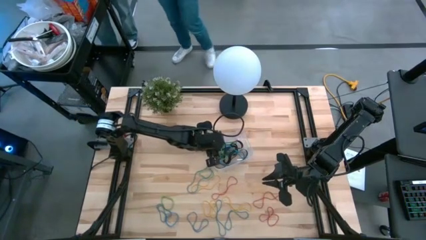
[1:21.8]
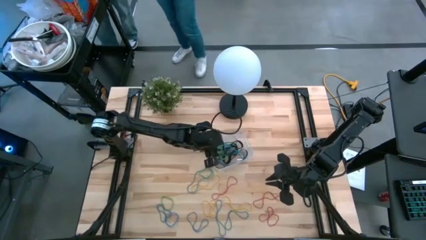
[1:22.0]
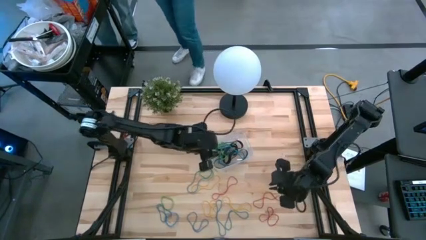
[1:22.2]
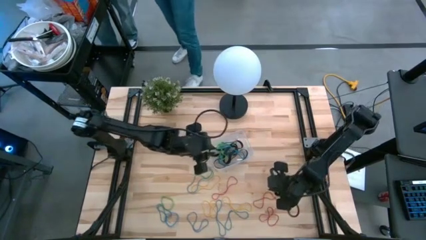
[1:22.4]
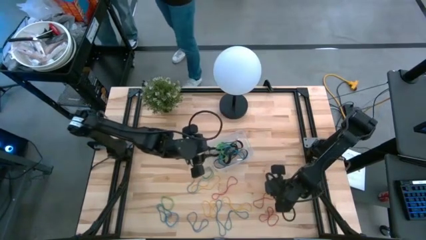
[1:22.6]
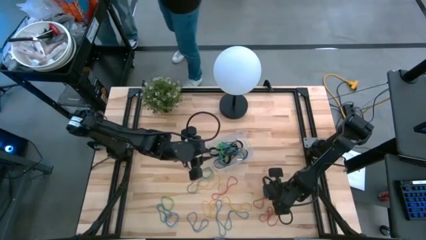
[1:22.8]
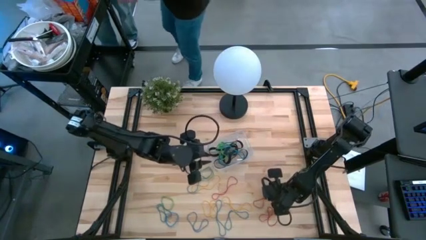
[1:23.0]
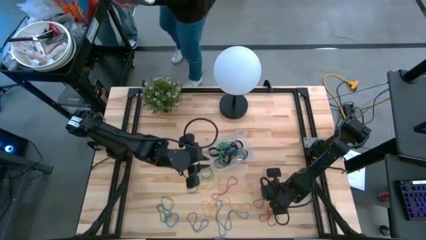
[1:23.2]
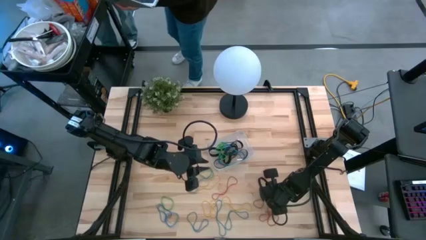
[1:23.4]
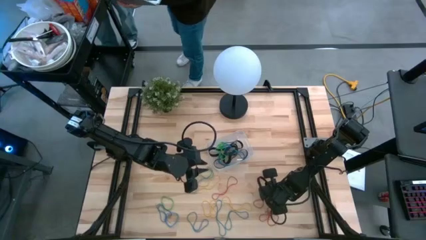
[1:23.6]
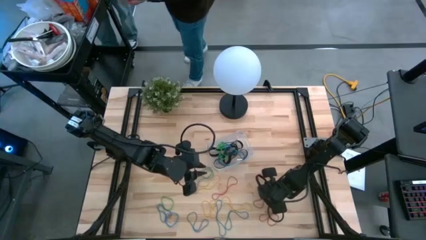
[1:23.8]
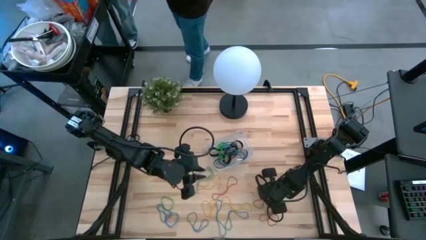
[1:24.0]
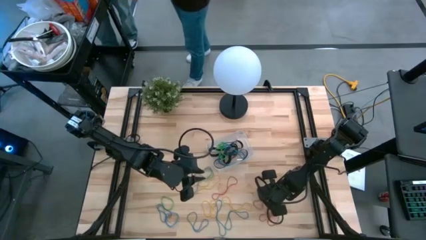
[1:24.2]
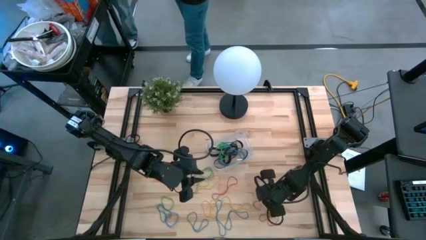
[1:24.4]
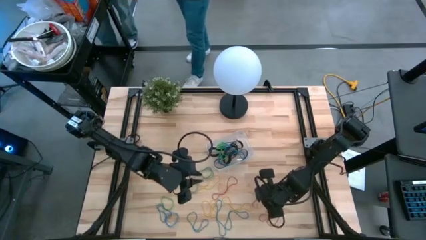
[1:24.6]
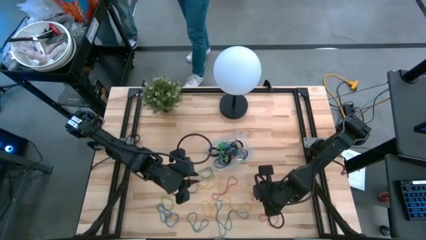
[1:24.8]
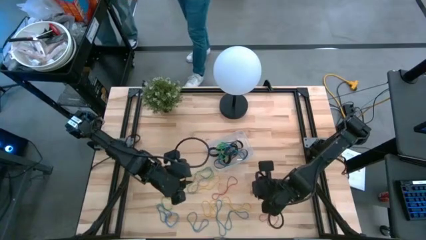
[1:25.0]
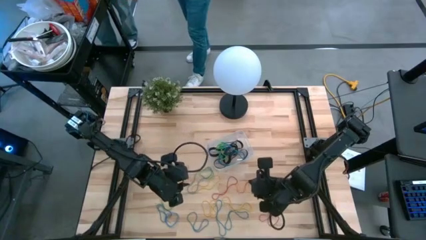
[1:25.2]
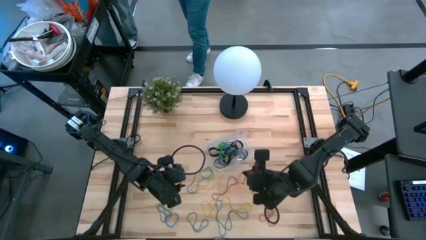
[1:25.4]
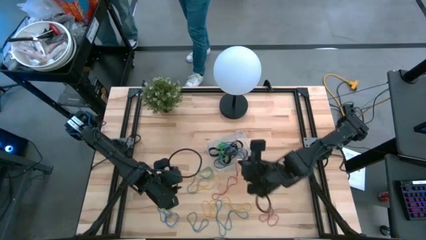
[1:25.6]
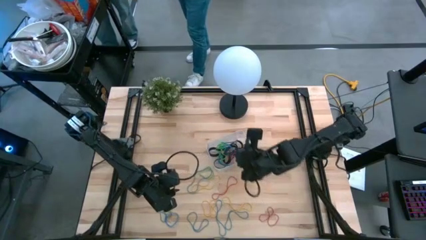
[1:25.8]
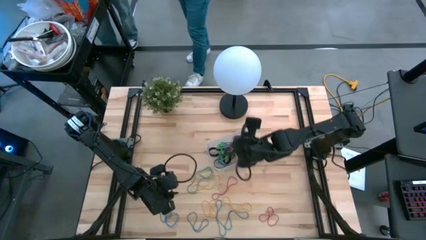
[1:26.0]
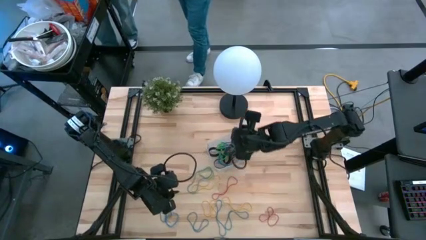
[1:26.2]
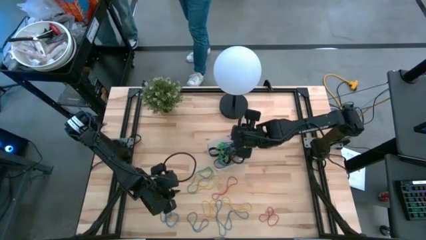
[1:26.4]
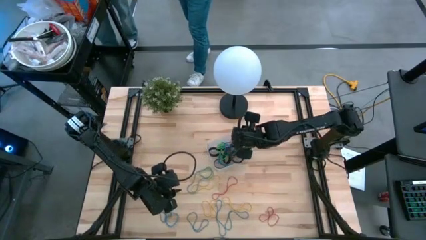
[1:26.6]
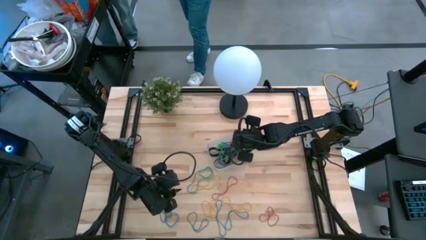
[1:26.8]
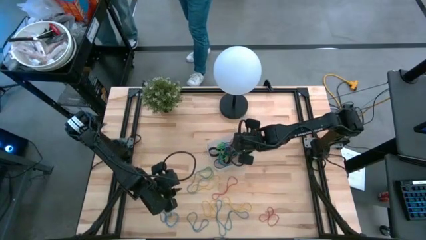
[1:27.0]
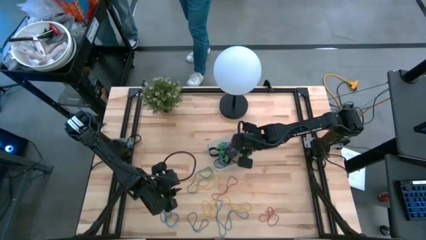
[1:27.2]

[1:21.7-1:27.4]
Task: Pick and place rubber bands into bin
Put the red rubber band into the transparent bin

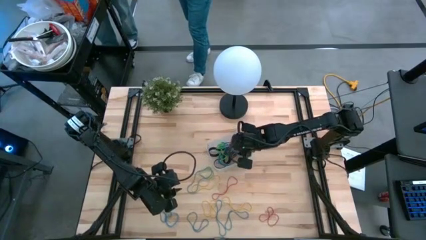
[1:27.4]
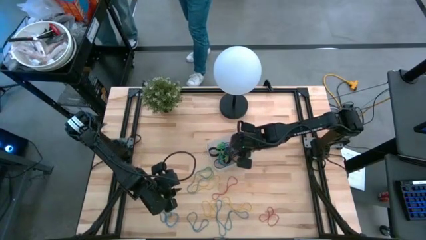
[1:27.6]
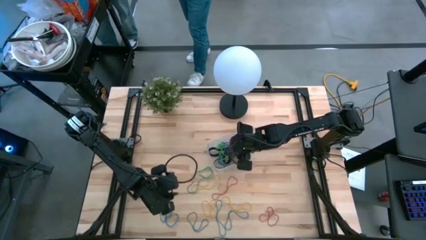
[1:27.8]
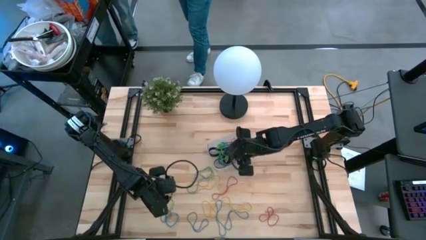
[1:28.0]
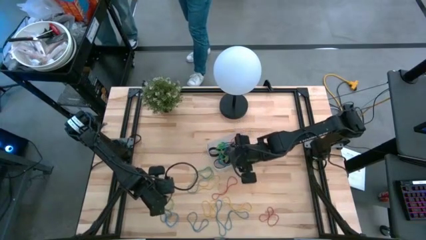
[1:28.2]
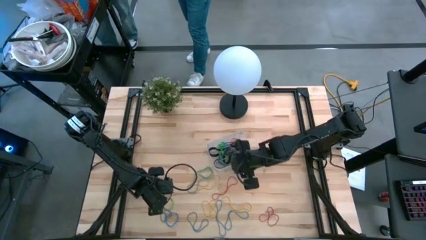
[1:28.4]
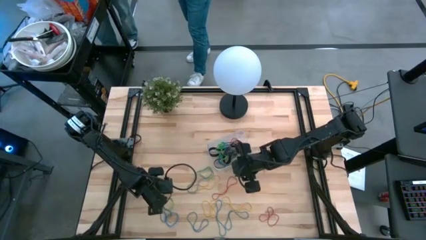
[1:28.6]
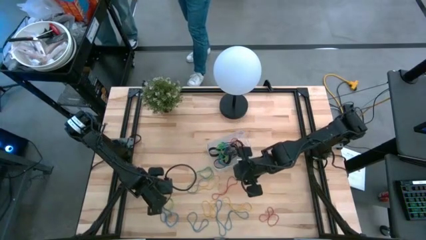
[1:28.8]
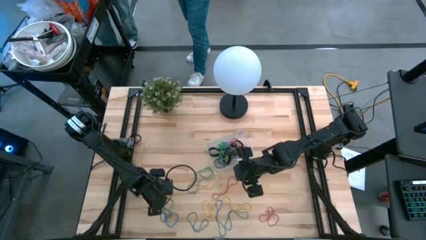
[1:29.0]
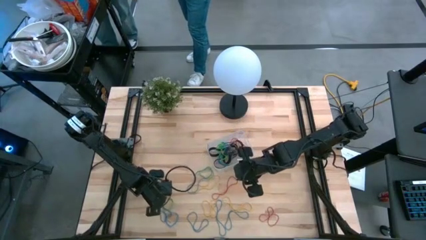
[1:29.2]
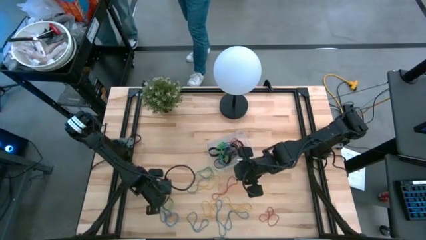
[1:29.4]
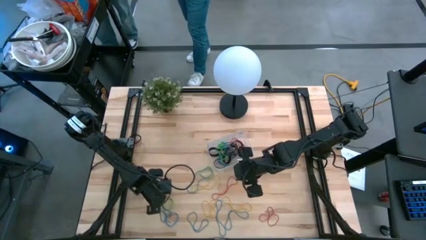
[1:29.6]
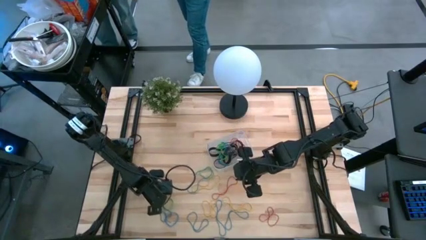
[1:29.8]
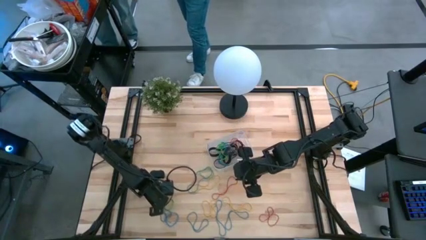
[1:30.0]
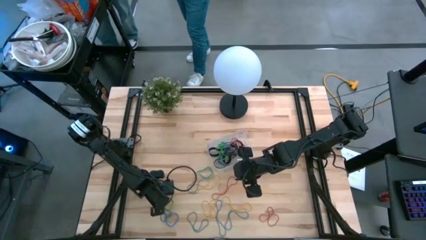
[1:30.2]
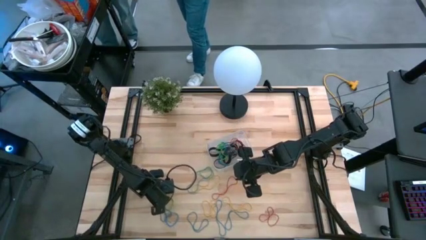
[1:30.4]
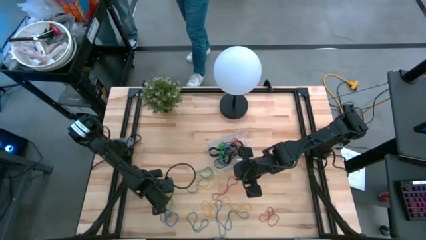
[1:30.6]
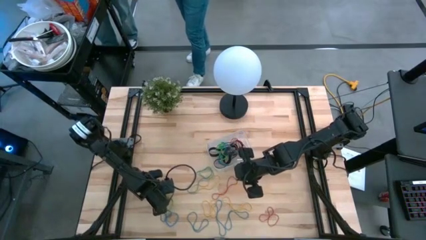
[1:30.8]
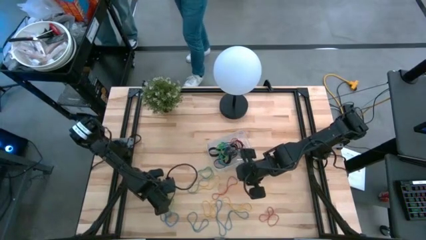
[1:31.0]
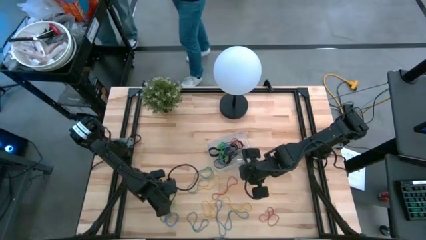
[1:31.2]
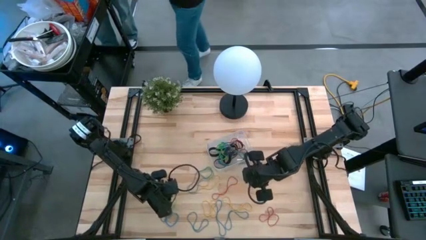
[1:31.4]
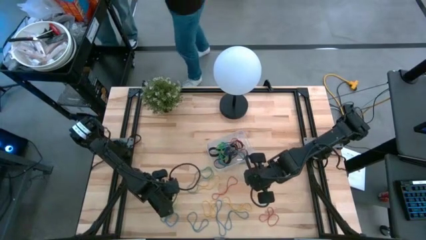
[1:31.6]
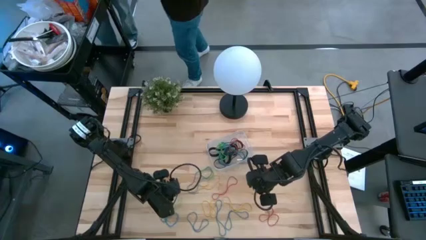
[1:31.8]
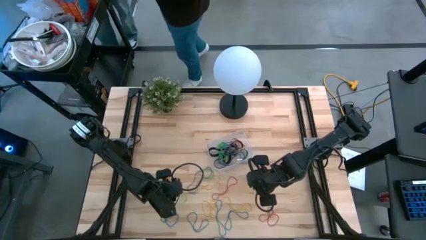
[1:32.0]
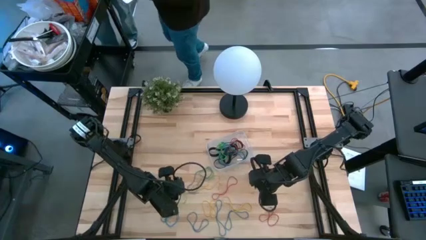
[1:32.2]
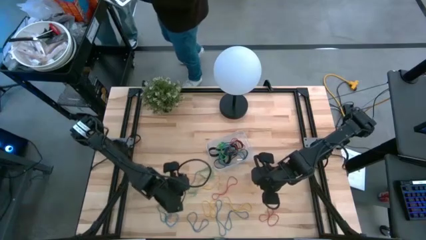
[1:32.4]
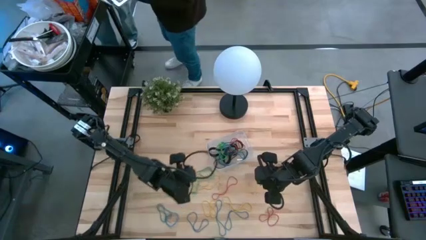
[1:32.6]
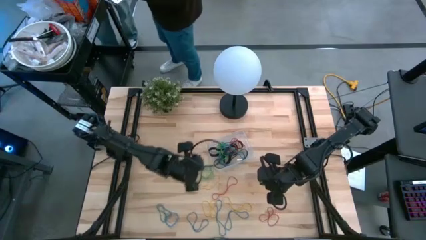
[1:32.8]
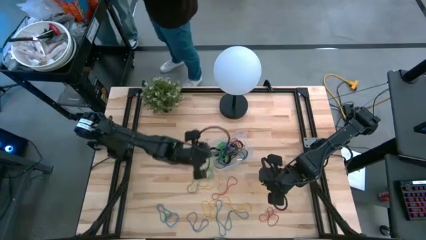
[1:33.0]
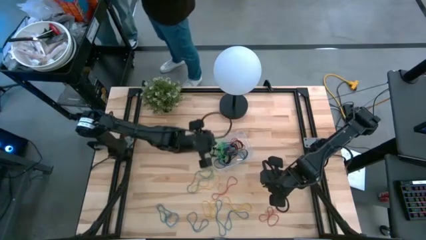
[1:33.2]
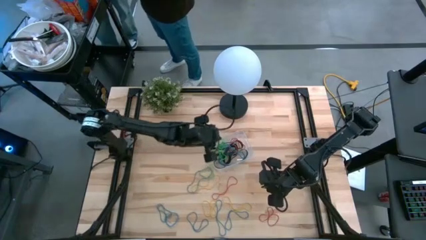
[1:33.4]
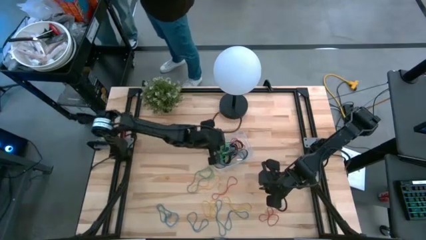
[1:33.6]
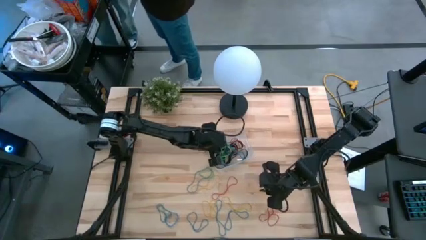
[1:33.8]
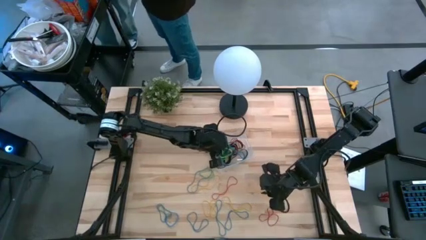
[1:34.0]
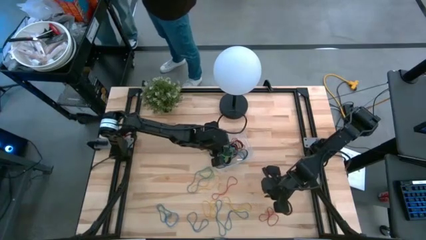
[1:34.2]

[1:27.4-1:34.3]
Put the green rubber band into the transparent bin

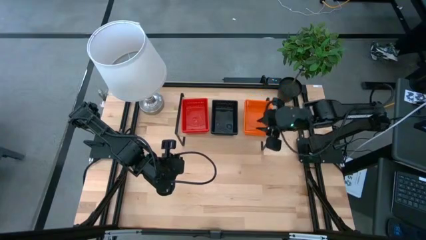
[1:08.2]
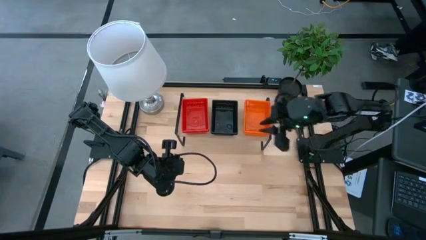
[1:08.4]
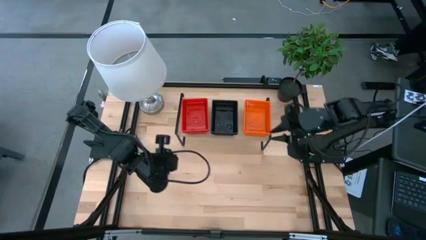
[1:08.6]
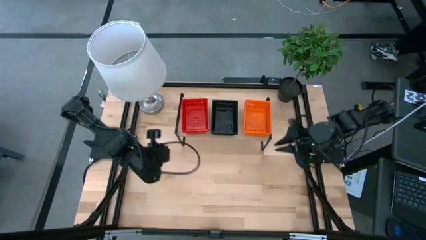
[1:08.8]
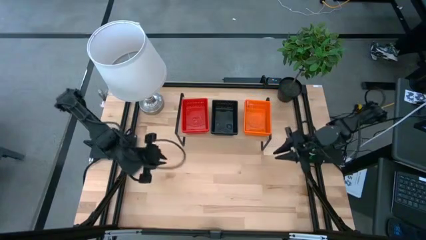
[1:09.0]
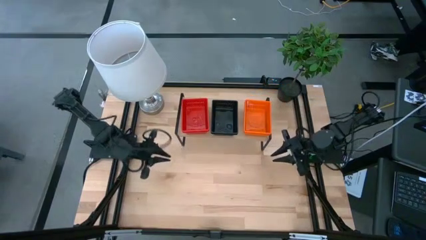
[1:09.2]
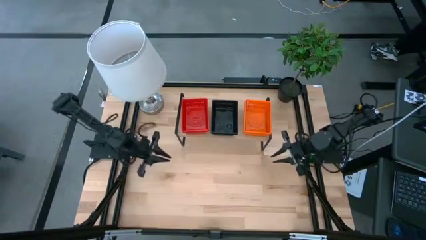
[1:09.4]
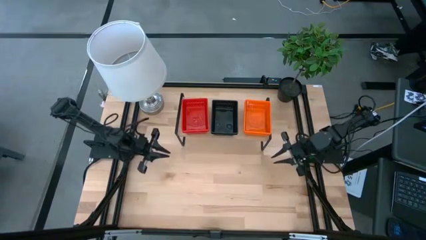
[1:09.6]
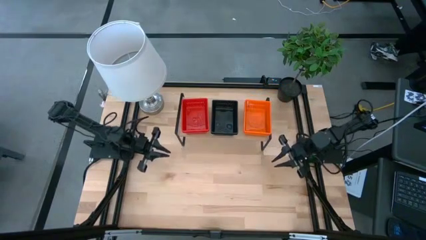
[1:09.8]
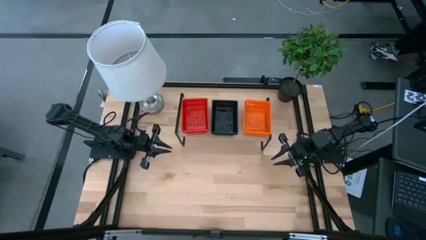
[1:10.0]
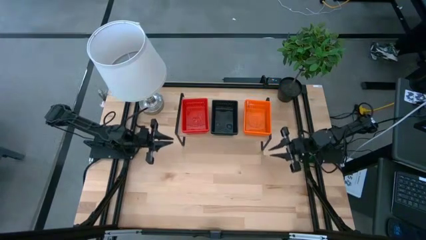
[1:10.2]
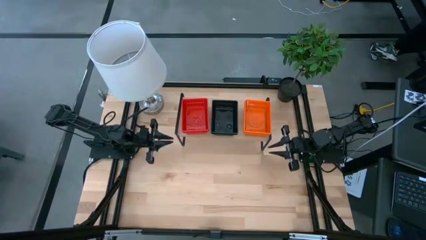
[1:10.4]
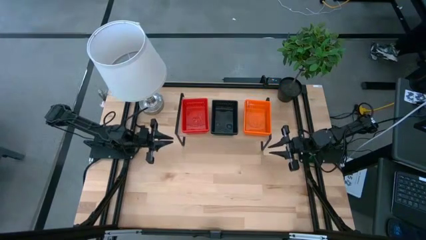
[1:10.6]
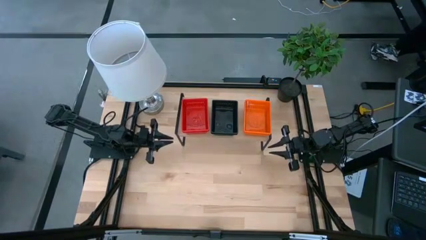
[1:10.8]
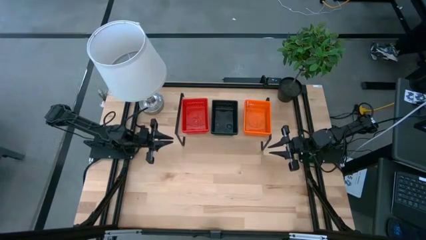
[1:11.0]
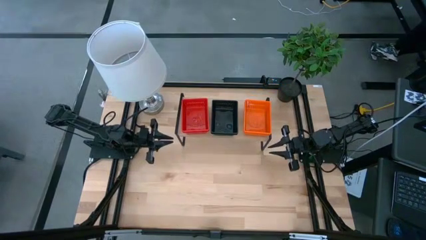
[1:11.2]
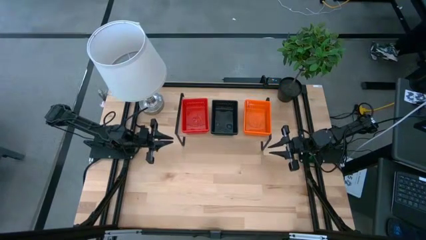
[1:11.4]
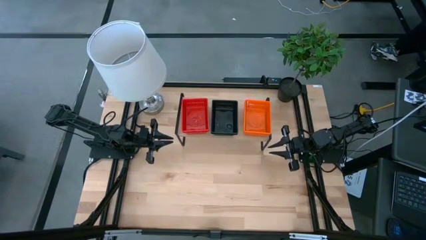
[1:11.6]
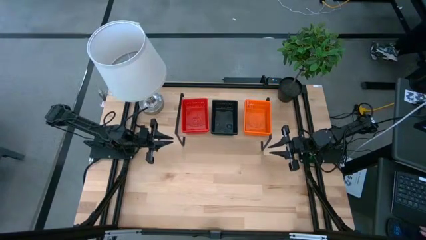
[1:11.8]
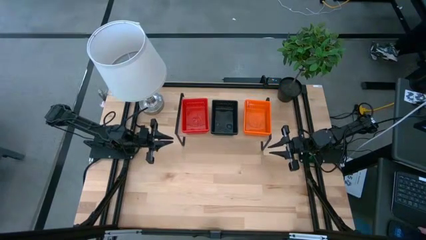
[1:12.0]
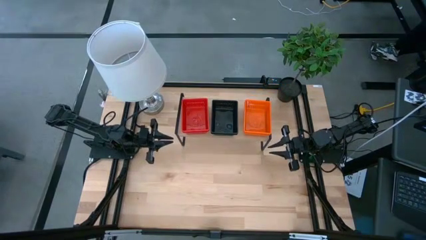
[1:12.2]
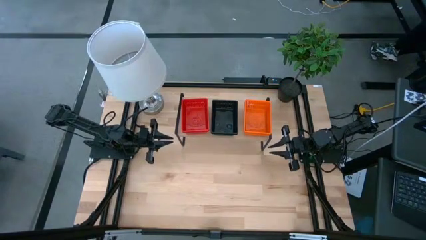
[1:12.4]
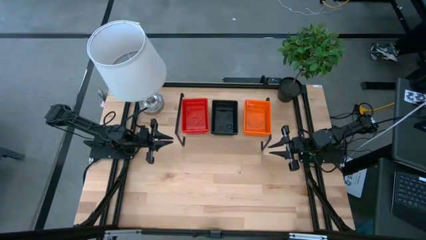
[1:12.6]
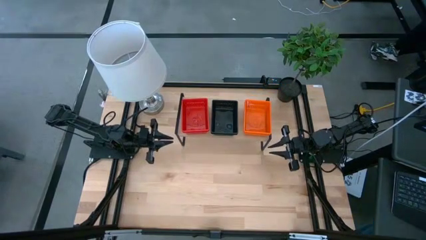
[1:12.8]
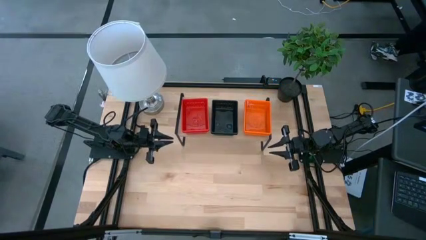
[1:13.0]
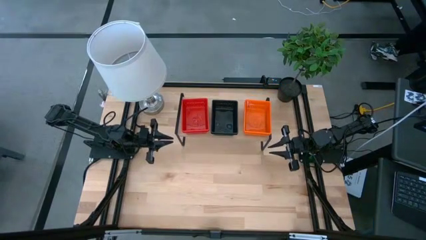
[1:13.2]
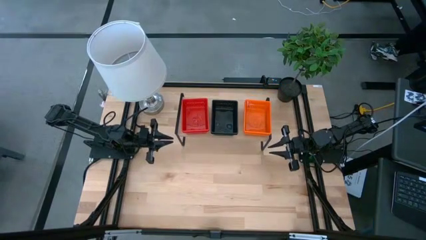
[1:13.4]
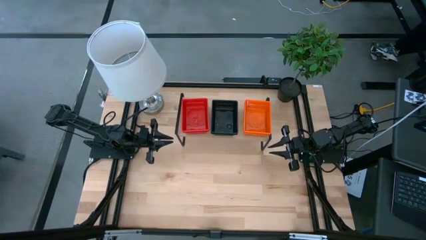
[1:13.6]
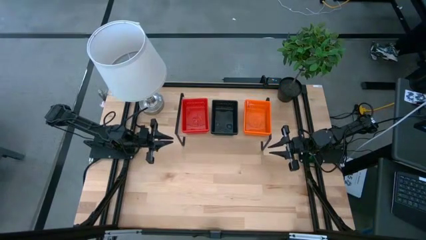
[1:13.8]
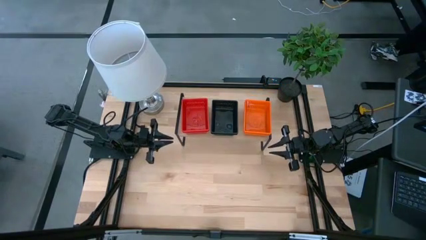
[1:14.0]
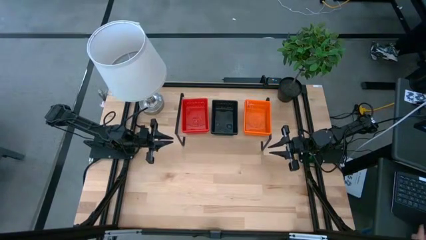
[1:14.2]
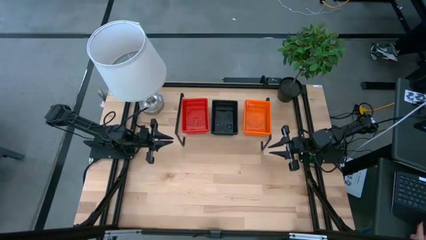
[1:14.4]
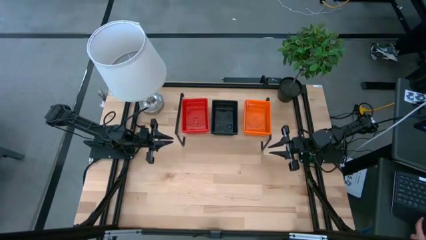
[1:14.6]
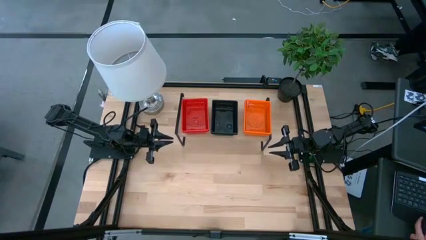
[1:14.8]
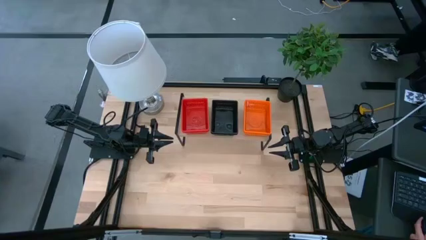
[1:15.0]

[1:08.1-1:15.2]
Task: Stack baskets on shelf by color
Return to Home Position
